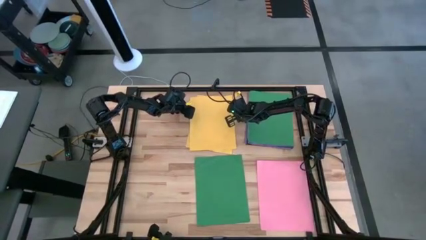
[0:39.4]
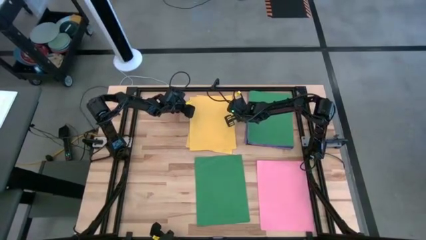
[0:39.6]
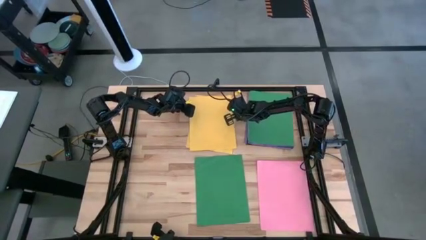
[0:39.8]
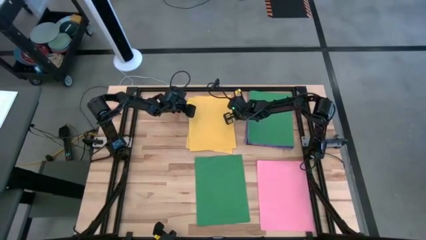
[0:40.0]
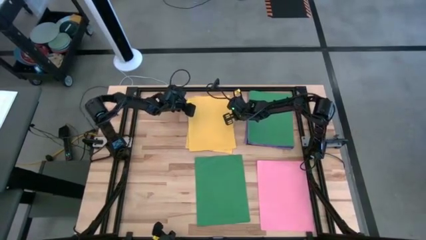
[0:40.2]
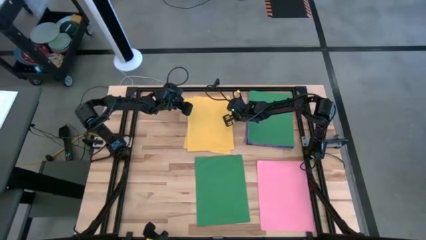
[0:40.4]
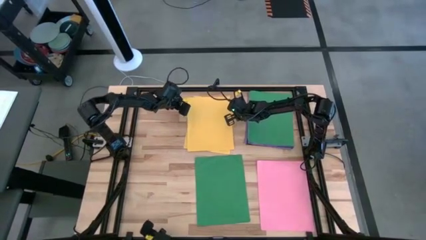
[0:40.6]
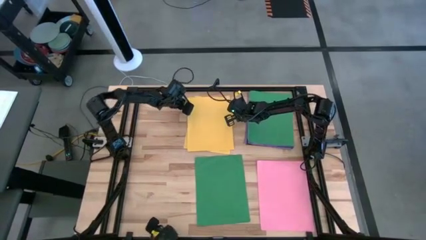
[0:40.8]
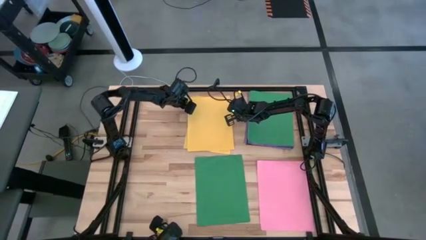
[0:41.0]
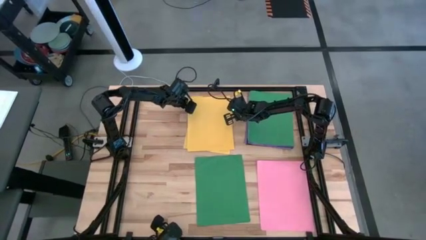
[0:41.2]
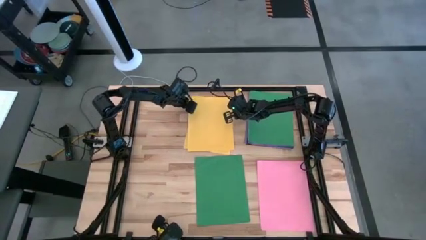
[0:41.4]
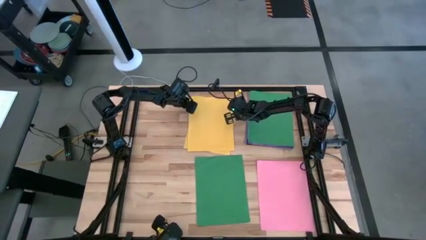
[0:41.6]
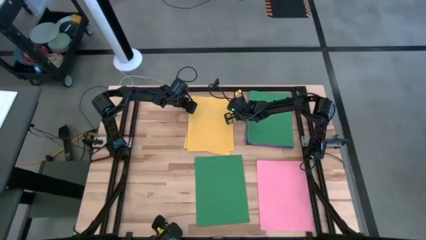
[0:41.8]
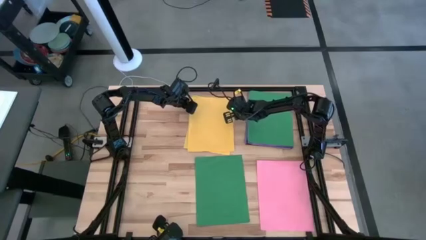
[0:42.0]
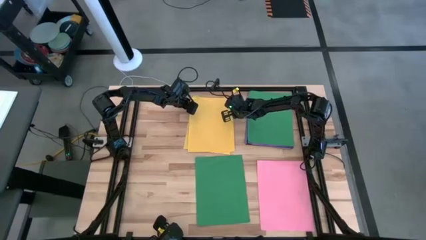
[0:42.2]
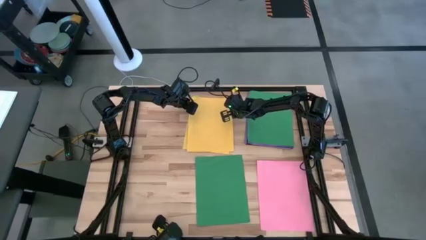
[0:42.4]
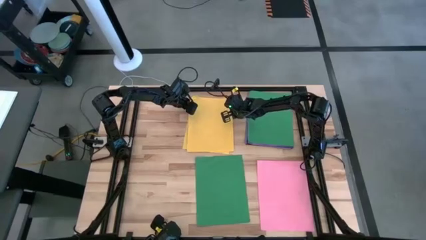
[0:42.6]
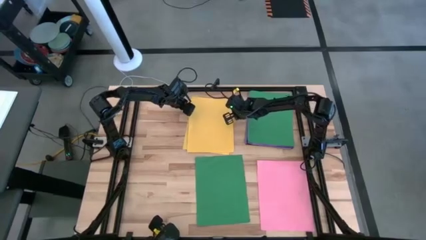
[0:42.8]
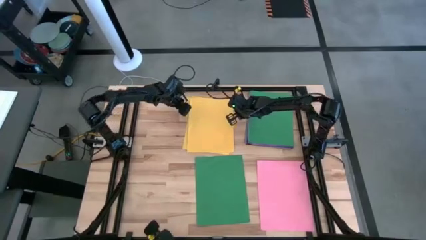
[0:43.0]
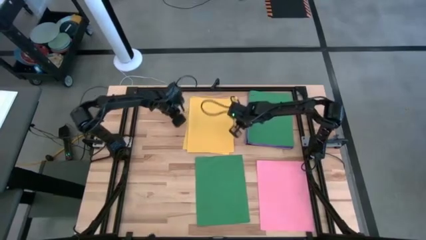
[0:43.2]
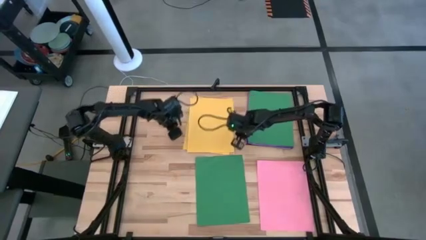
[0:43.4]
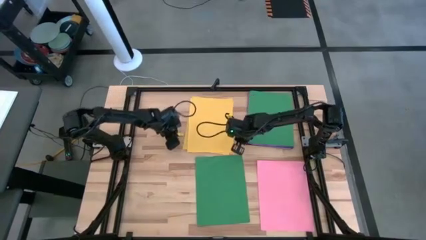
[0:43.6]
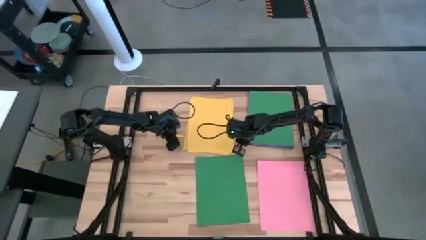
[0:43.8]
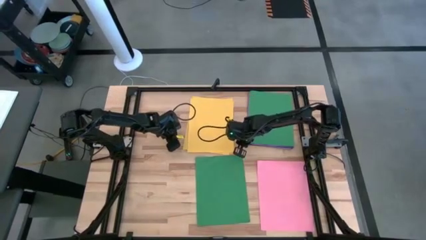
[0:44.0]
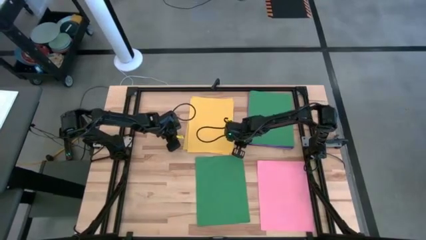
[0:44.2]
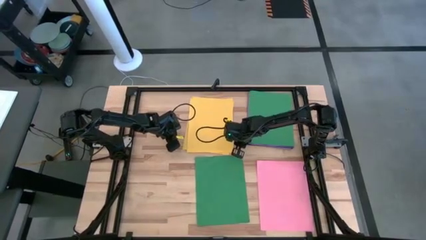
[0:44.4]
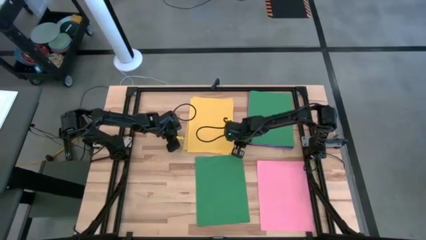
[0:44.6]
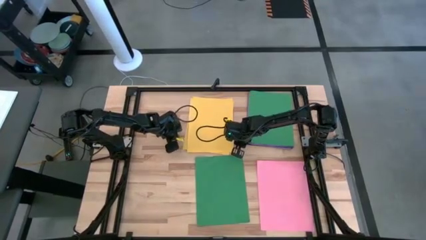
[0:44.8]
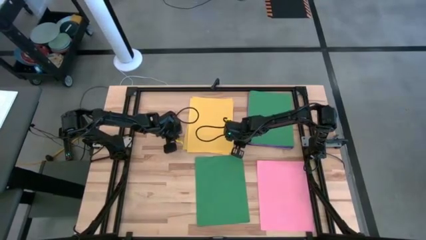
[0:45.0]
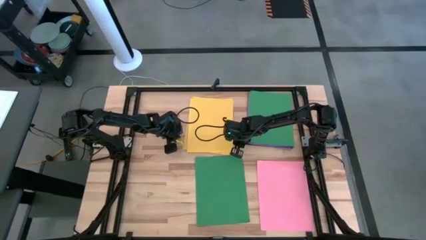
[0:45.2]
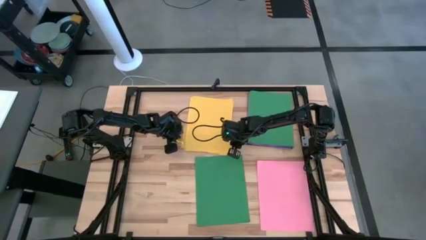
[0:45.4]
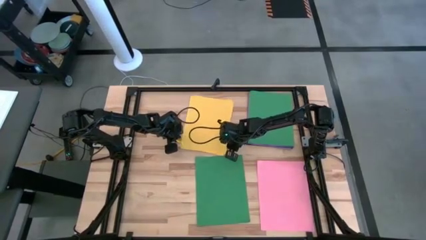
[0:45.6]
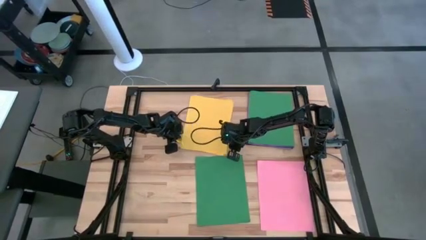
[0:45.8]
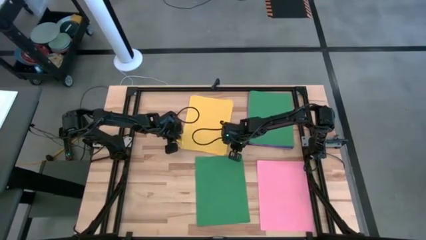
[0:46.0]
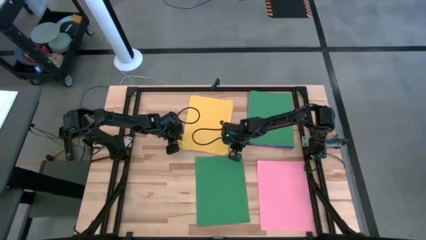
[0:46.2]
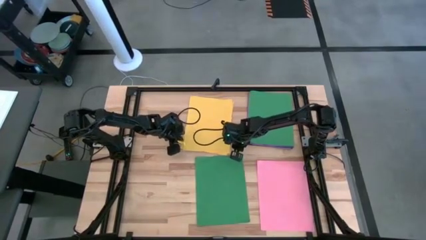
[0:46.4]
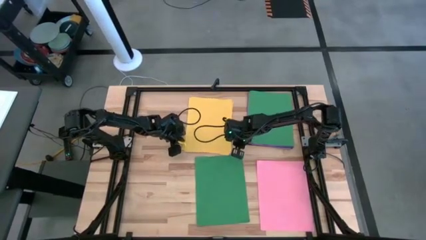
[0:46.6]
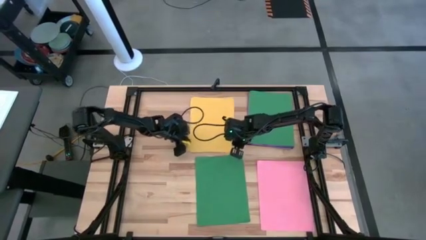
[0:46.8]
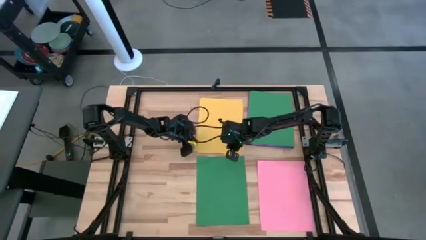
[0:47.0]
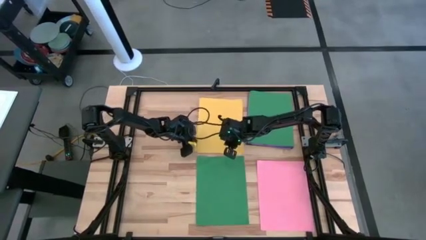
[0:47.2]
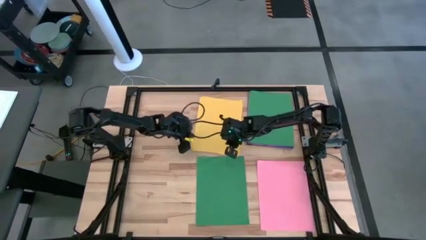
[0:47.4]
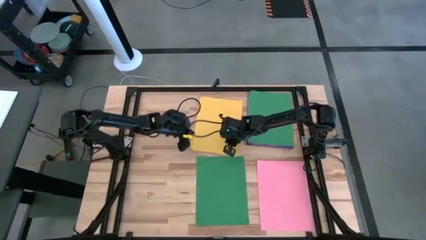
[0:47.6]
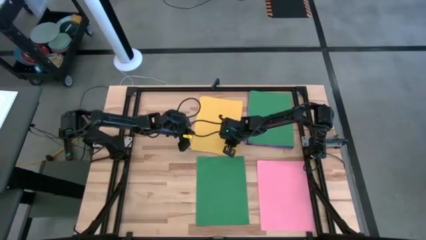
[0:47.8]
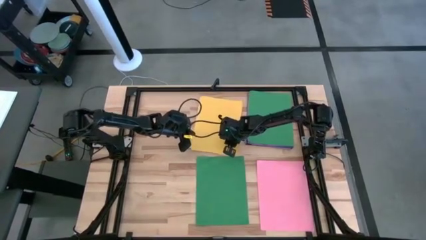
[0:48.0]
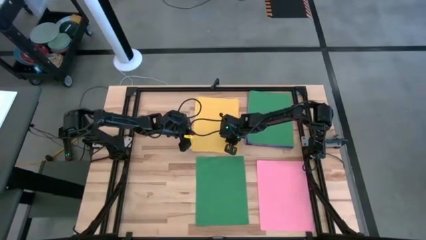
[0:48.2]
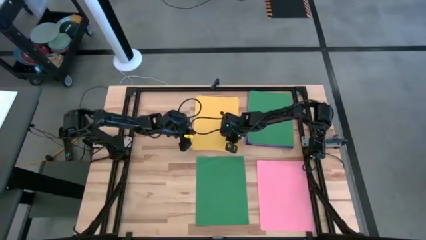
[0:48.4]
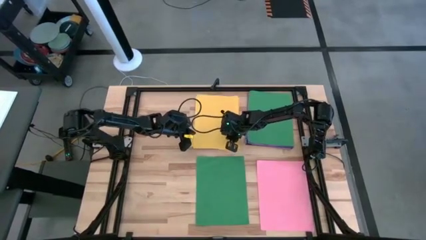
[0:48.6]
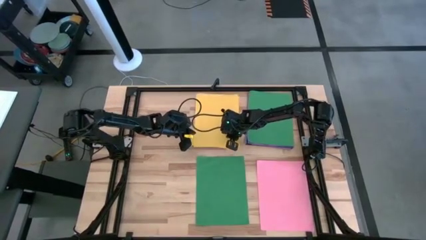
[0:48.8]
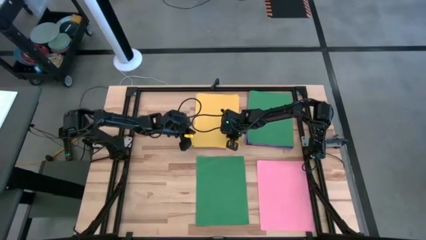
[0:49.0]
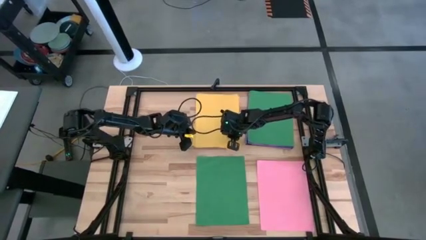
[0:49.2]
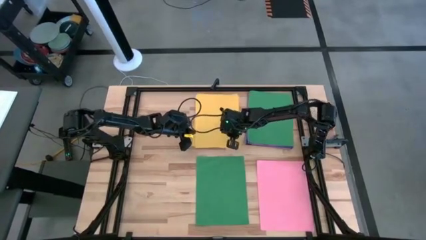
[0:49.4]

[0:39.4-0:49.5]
Task: Organize paper
Stack the yellow paper on top of the yellow paper

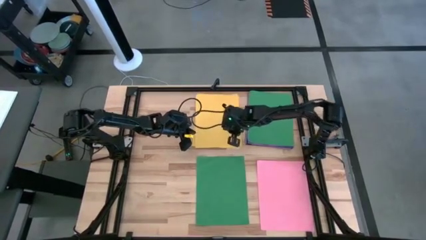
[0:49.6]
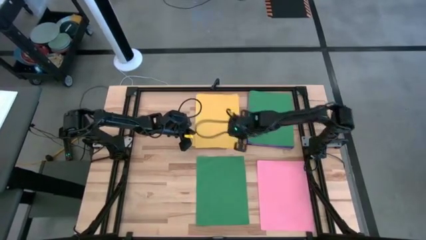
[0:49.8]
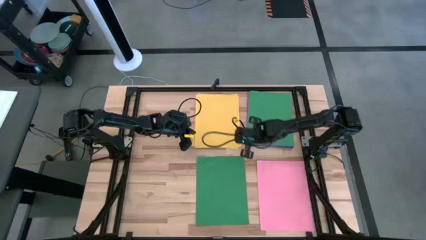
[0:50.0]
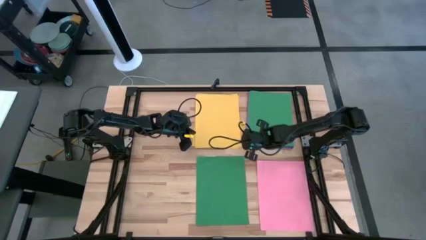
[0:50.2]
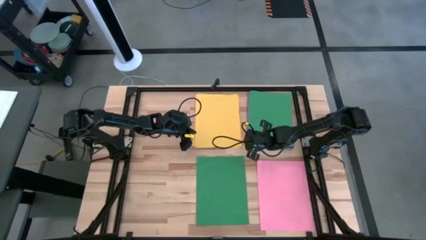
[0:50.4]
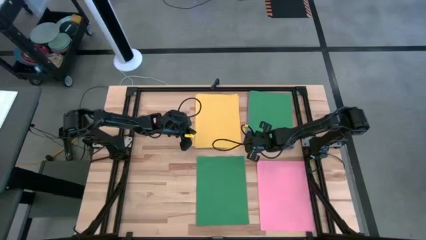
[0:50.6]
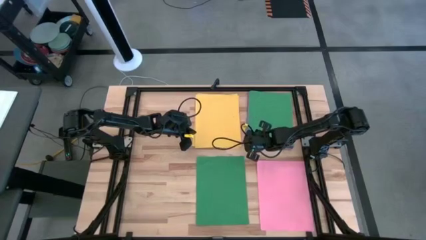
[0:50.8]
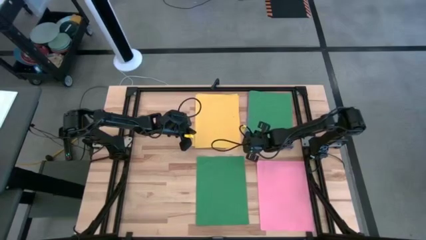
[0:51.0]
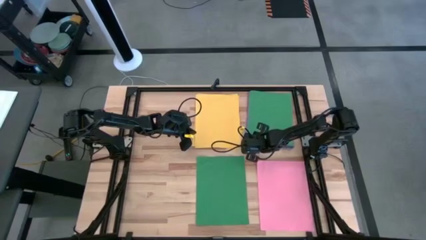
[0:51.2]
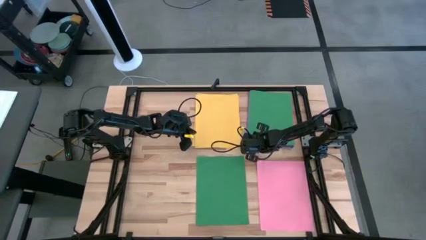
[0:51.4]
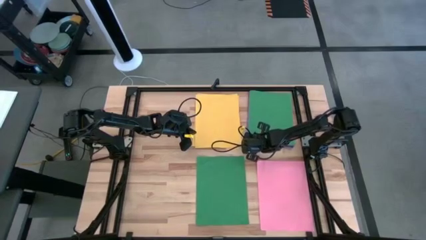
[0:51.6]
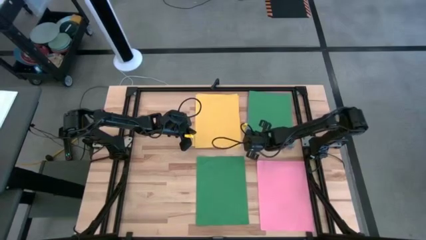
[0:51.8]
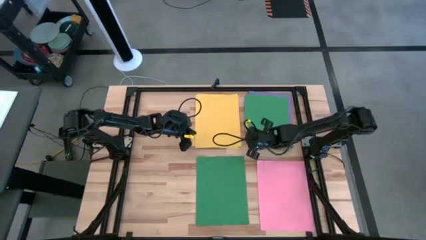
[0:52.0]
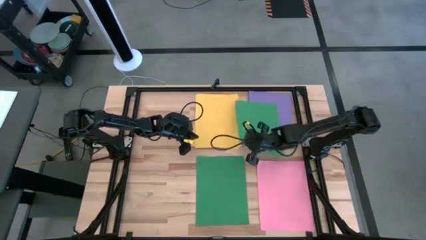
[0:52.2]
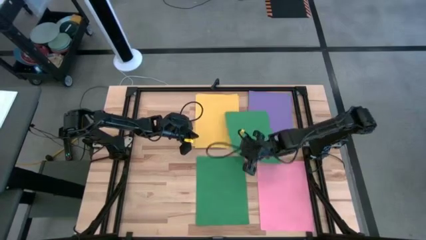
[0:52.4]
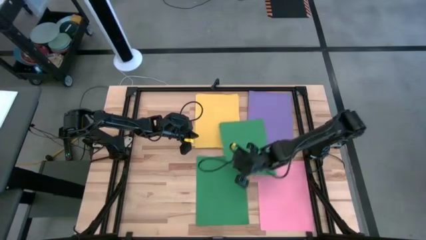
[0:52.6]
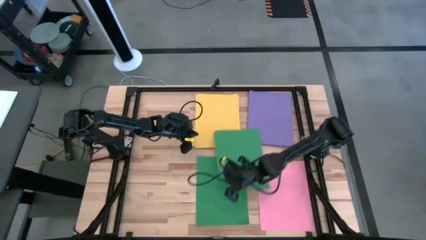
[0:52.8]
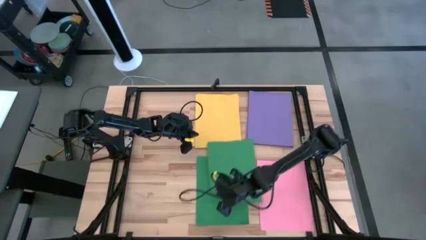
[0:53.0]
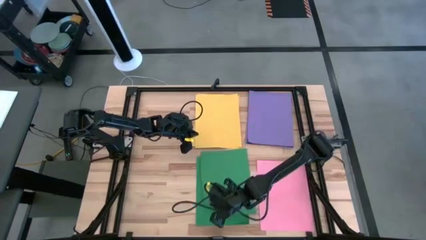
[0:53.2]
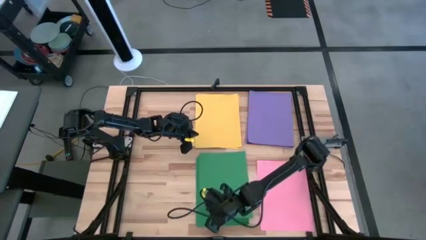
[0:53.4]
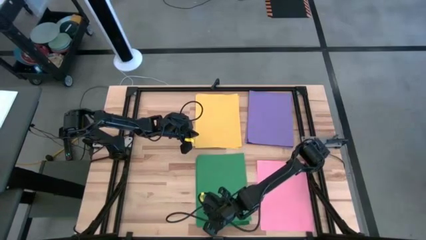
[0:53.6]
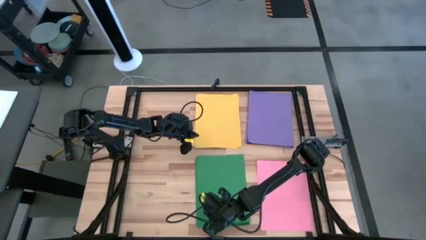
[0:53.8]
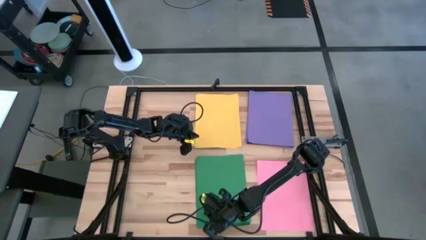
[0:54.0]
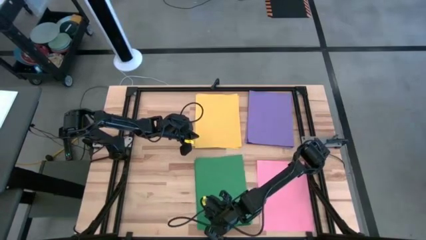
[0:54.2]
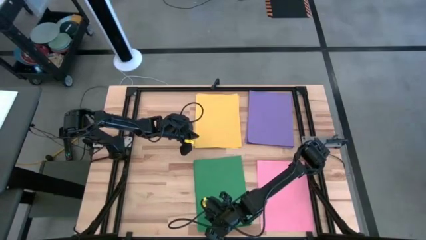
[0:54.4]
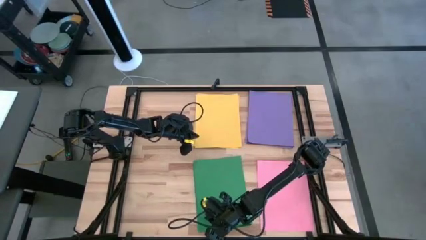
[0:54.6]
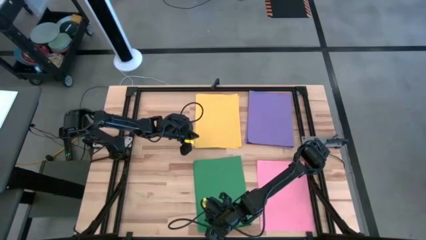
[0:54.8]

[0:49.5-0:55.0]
Stack the green paper on top of the green paper

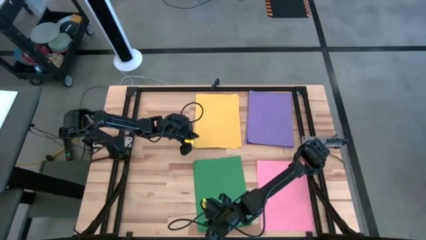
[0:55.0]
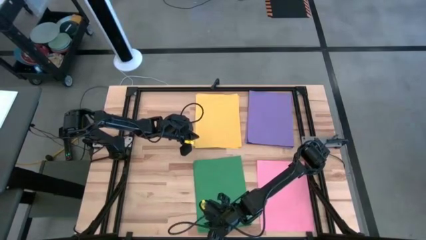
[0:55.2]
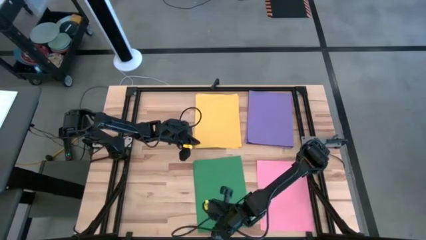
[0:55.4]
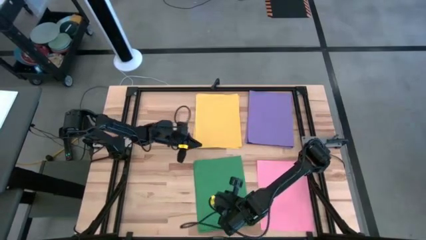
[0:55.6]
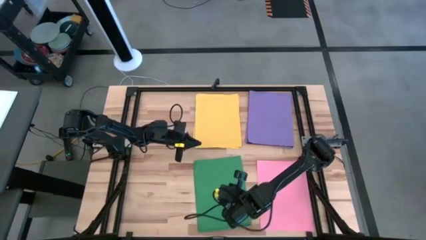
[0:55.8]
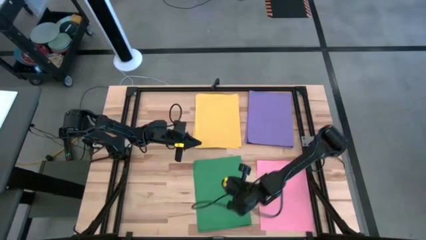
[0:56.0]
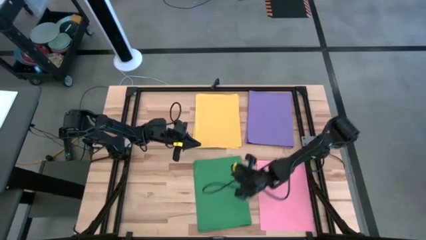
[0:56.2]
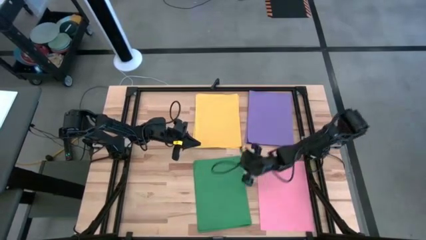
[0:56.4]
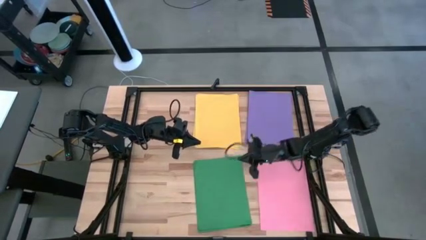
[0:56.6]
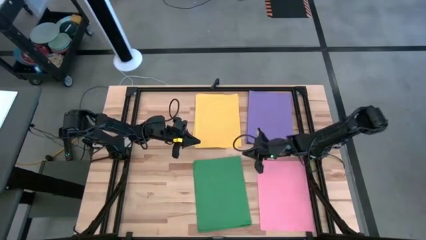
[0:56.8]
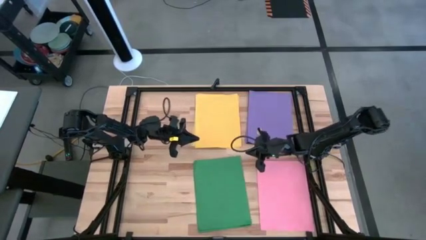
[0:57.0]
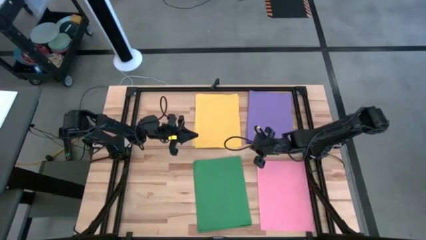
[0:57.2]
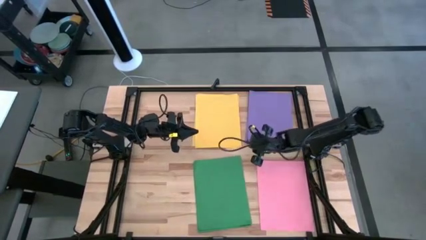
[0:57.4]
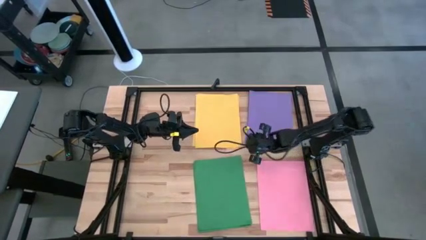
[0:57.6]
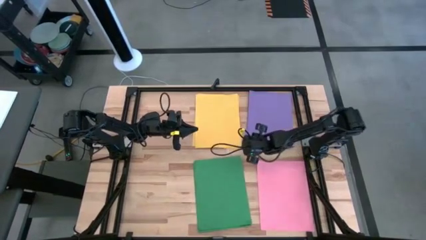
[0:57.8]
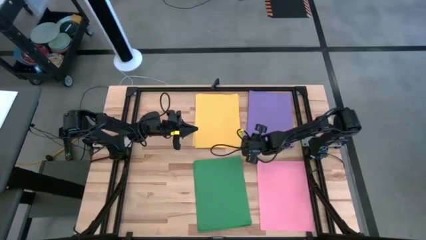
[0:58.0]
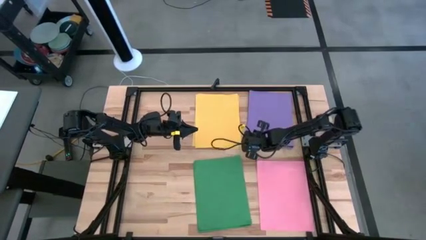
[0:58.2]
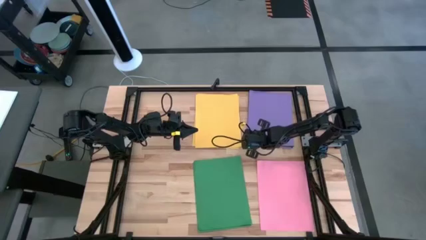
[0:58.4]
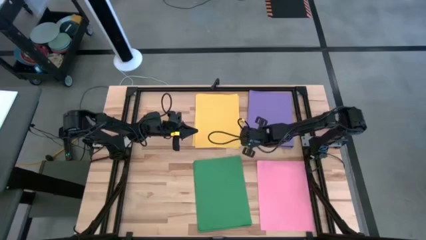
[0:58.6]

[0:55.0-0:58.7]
Move the purple paper to the top left of the table
